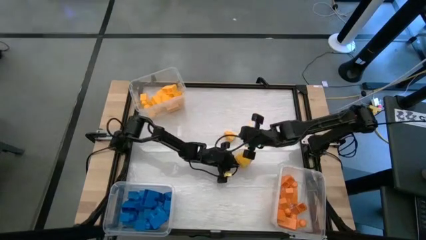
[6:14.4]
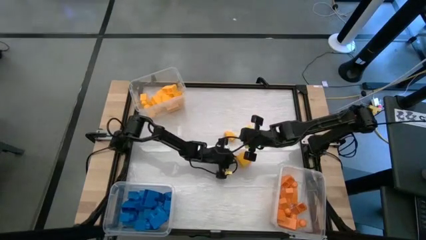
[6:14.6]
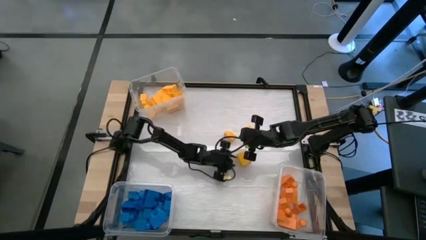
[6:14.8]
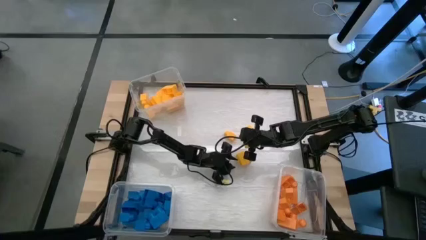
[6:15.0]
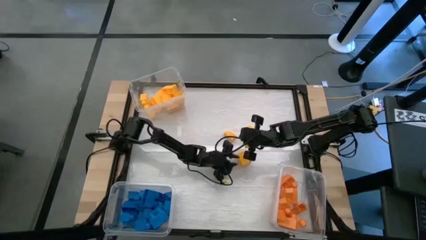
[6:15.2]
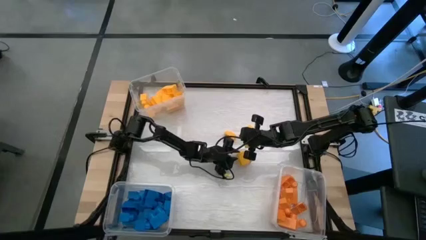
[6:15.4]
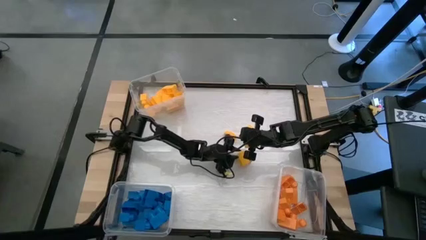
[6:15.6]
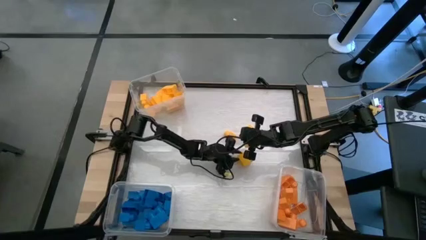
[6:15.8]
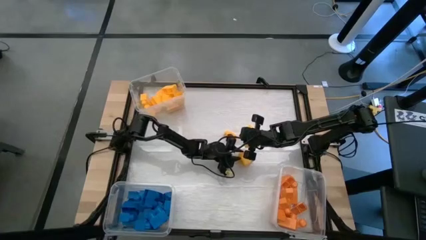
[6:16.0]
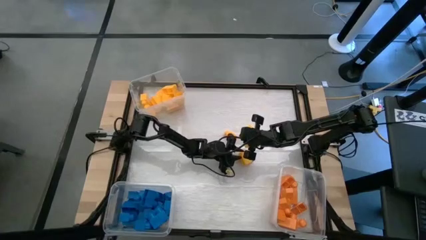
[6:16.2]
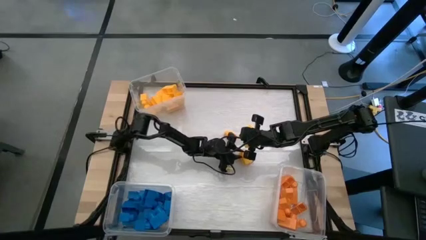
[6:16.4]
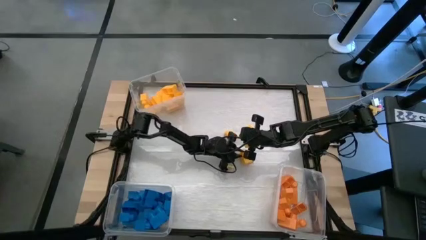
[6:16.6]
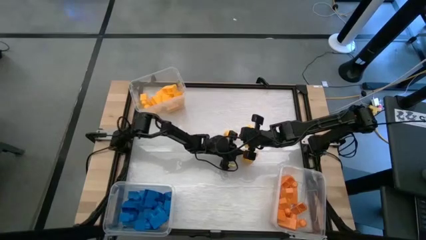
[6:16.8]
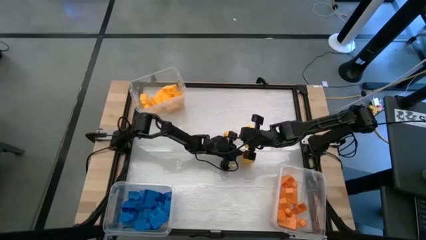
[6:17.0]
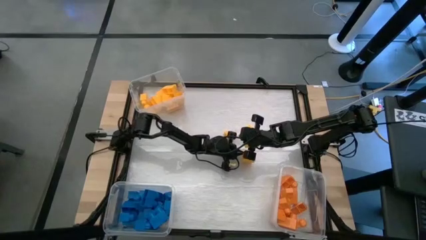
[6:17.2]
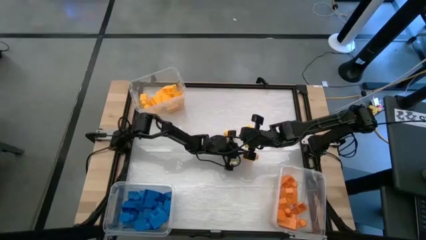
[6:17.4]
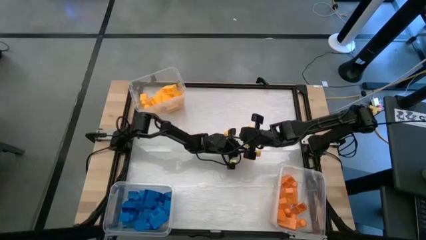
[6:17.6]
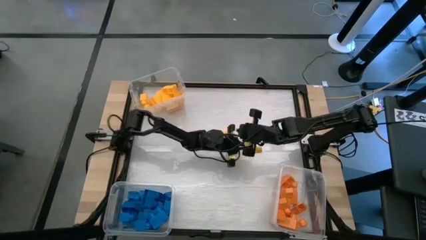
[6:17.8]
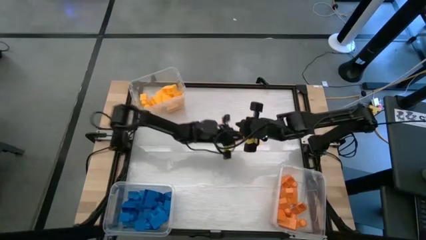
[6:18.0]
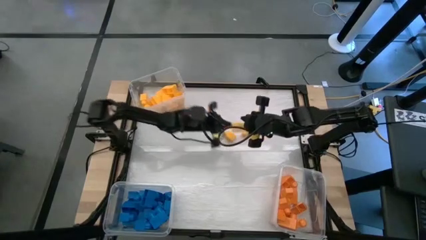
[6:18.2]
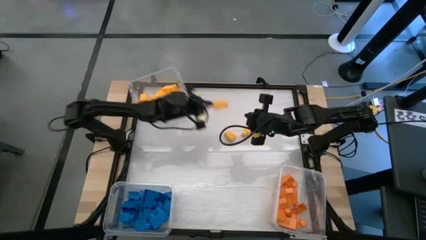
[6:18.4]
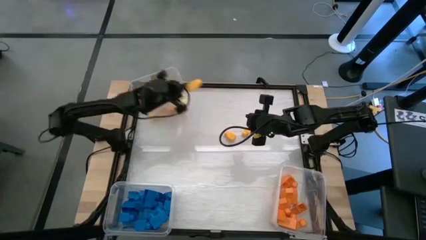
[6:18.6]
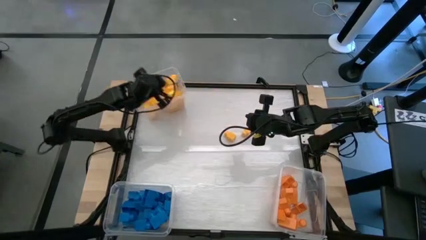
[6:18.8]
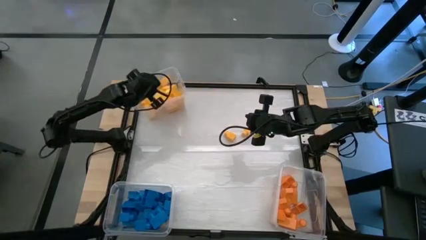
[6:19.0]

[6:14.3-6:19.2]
Task: Sort blocks
Put the yellow game piece into the top transparent bin

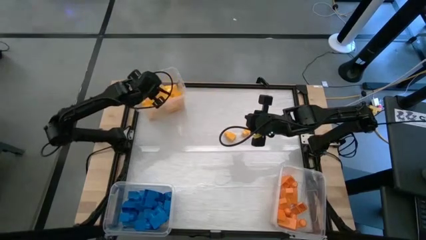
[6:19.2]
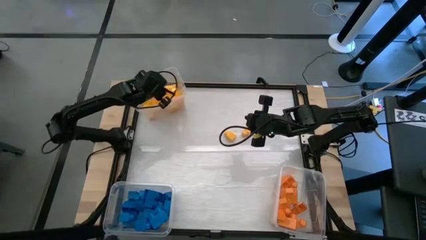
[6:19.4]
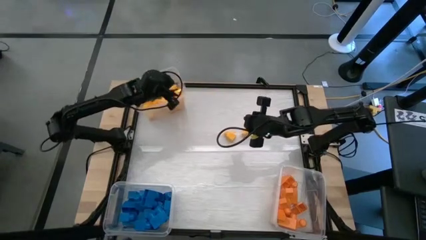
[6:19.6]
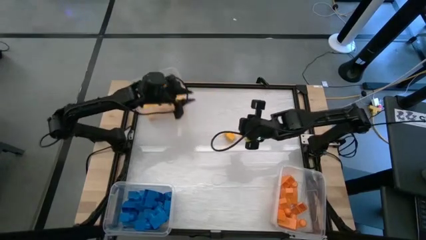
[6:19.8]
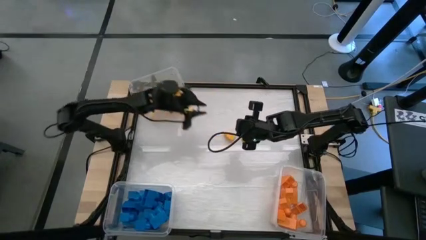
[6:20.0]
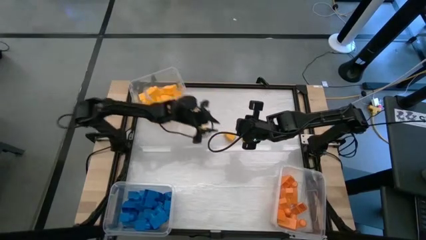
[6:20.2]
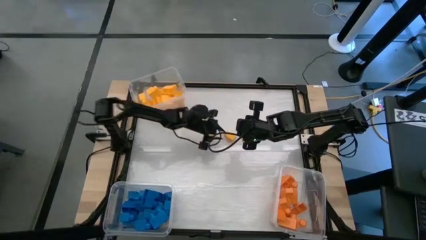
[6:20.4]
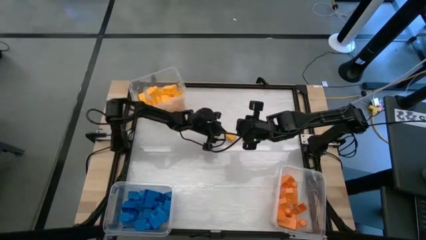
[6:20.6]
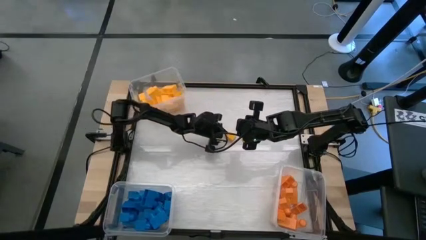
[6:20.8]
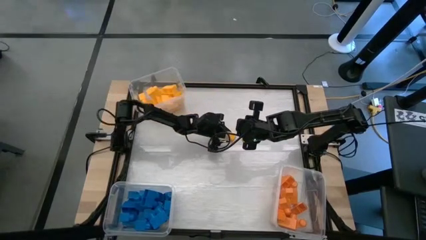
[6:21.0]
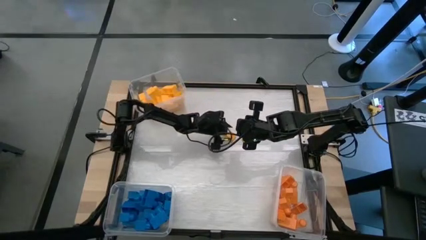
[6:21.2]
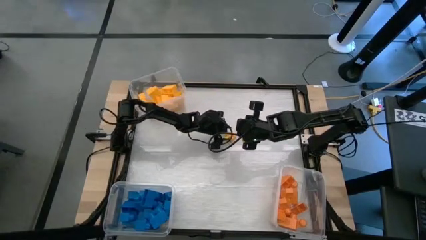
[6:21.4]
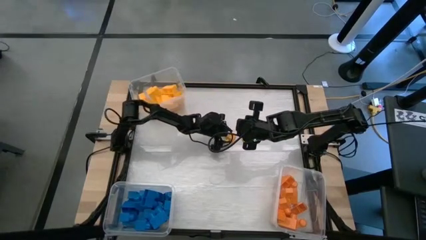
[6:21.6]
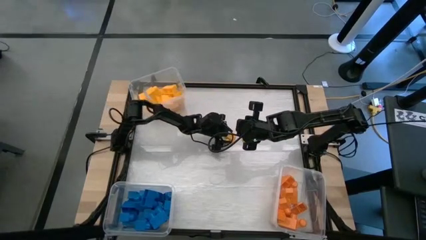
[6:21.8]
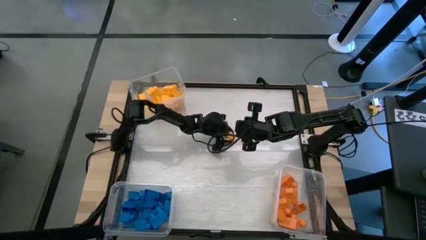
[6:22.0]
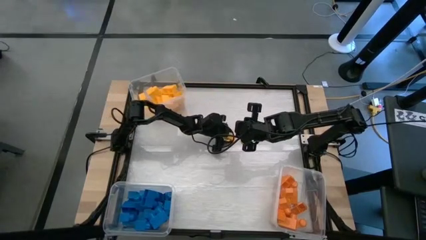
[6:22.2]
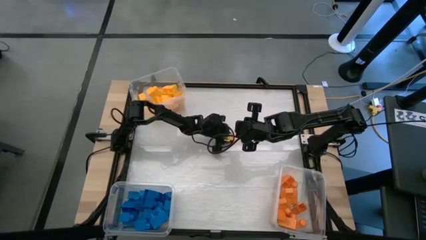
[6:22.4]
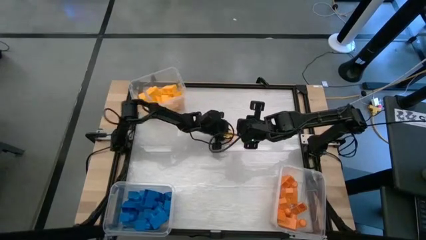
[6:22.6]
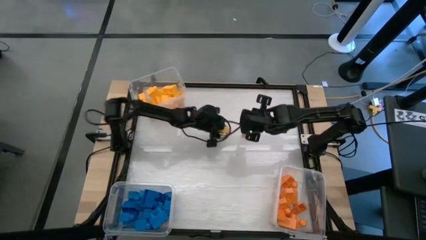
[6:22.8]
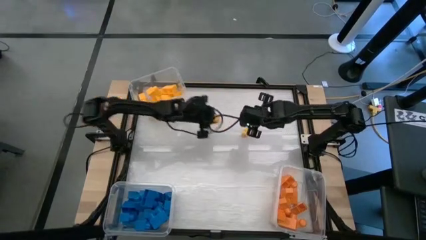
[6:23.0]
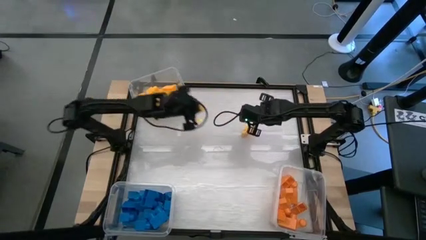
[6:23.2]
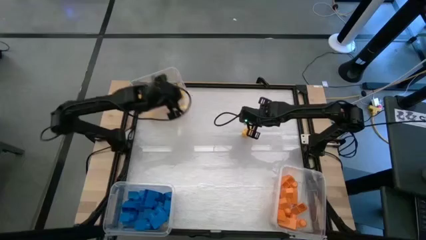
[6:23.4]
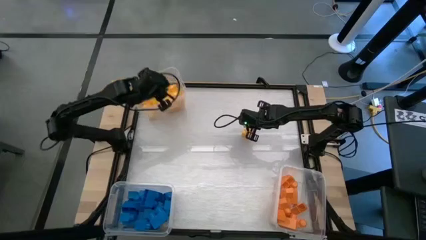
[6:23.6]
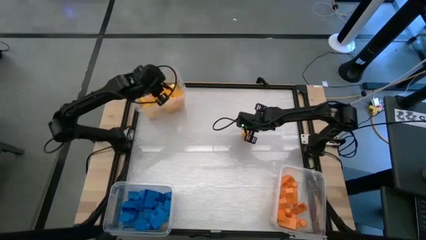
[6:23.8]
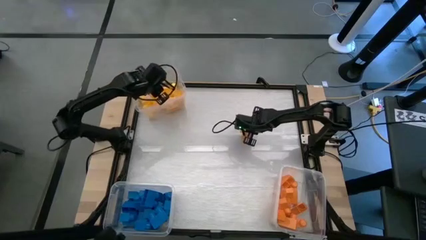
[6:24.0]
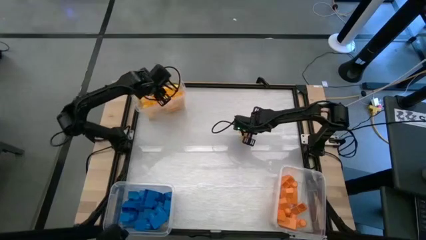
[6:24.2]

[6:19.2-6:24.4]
Put the yellow game piece into the top transparent bin

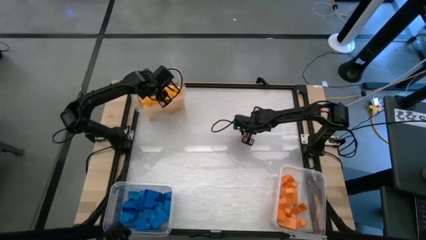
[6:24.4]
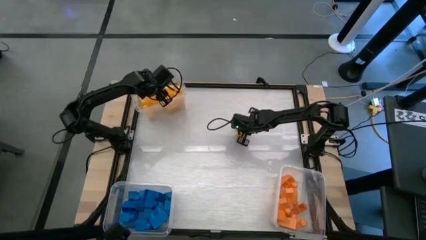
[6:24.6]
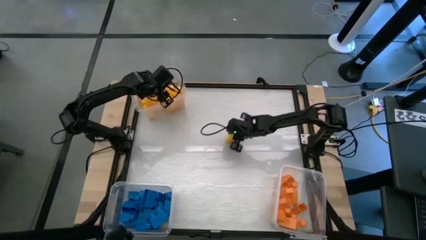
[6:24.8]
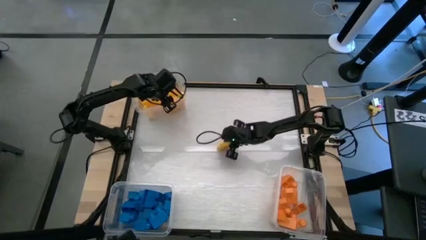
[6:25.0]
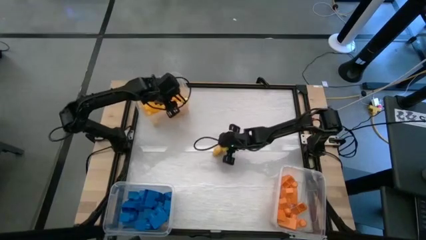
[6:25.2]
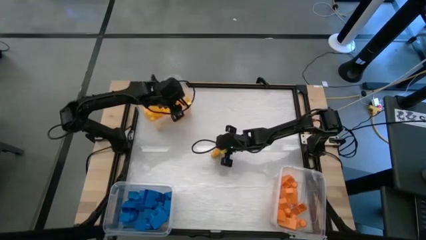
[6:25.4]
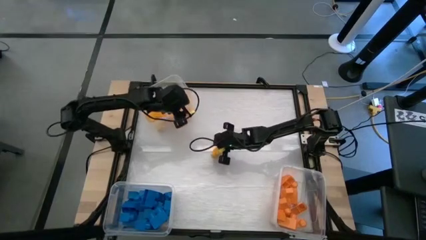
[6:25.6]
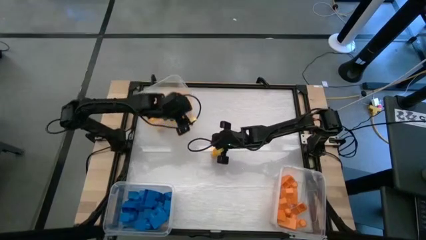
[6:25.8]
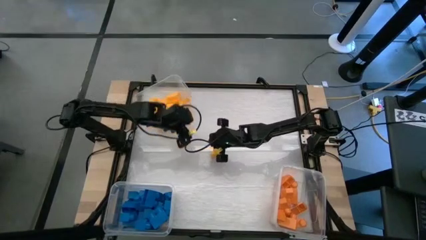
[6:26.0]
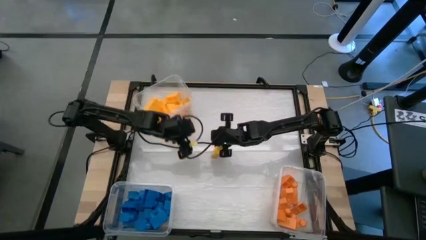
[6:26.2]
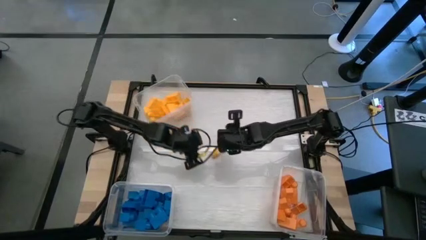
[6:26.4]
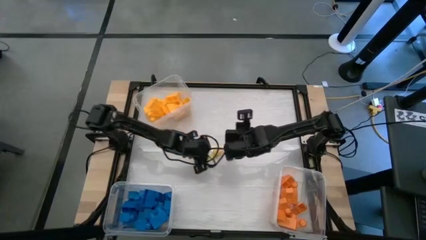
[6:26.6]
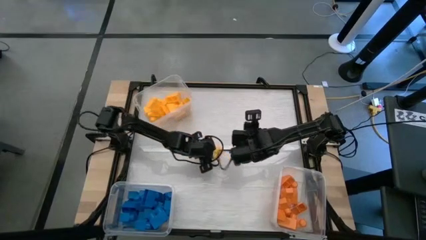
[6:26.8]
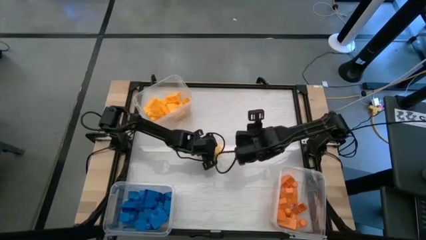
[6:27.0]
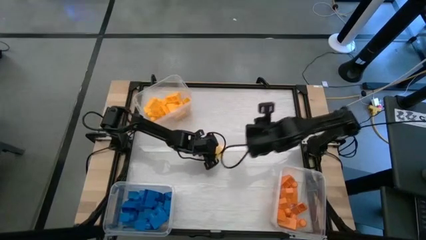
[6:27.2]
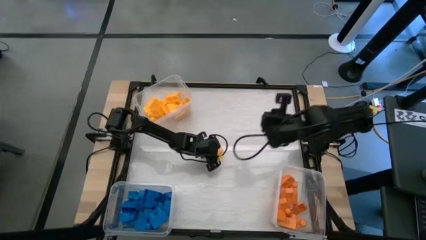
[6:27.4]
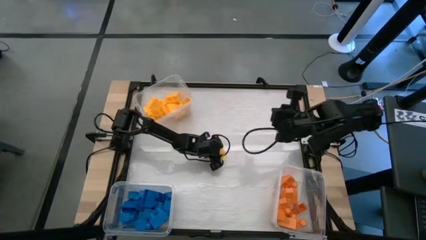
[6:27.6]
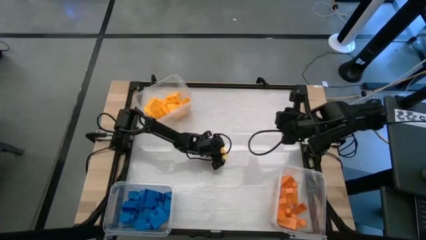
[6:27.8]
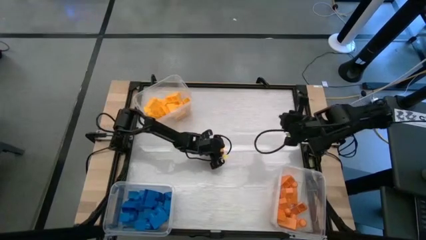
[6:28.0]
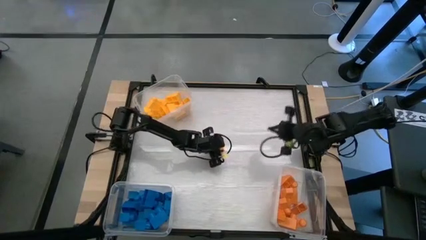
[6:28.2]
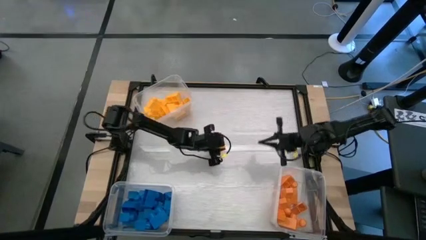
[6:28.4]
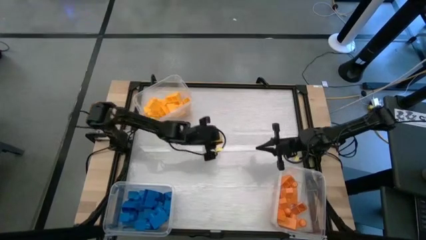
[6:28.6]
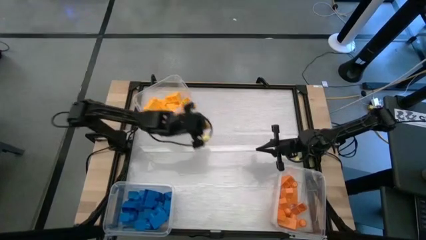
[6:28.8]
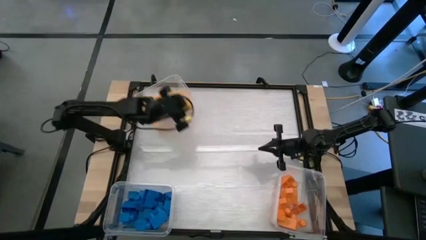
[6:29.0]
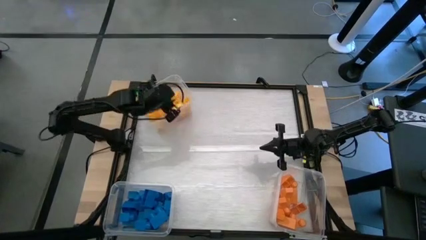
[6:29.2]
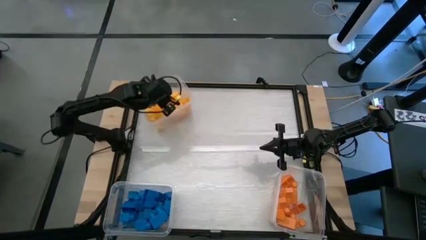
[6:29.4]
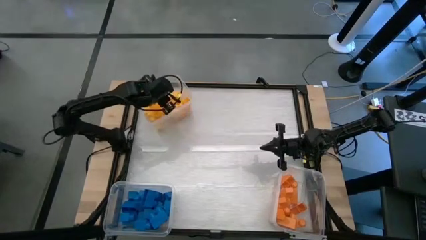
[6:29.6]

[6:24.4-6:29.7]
Put the yellow game piece into the top transparent bin

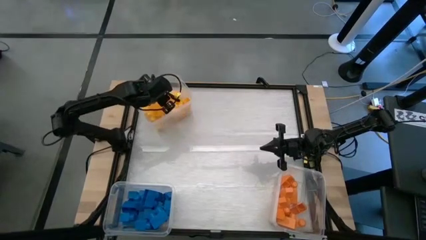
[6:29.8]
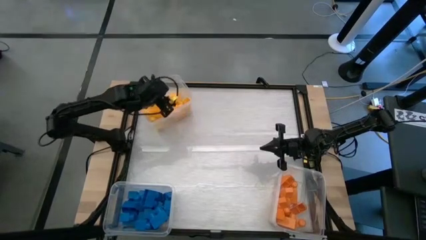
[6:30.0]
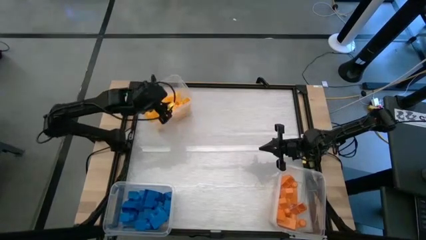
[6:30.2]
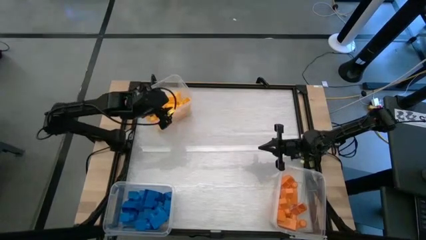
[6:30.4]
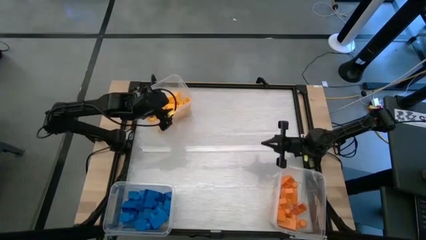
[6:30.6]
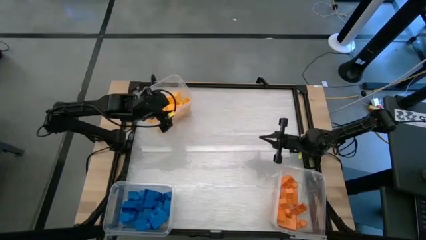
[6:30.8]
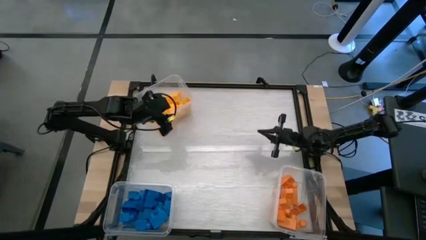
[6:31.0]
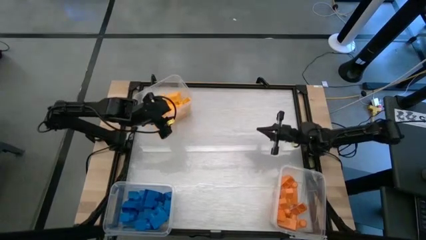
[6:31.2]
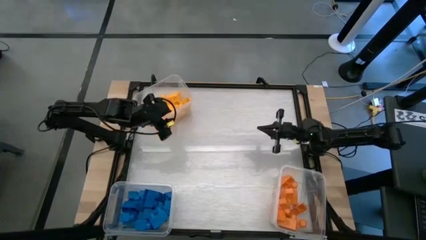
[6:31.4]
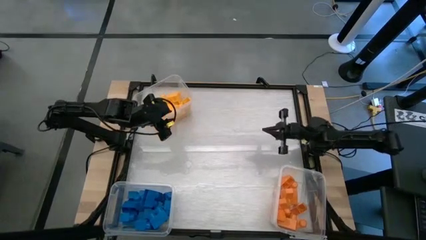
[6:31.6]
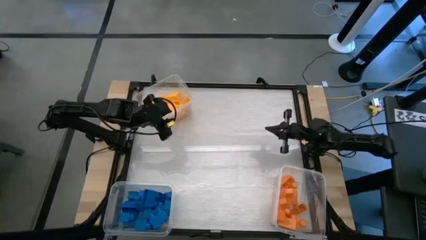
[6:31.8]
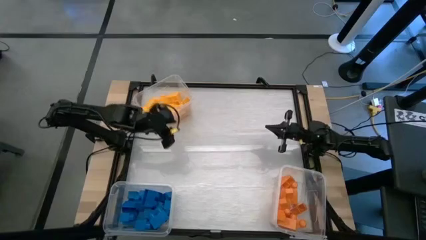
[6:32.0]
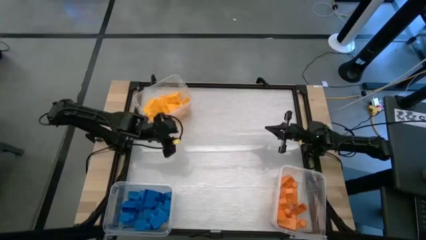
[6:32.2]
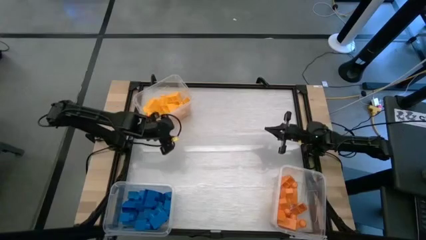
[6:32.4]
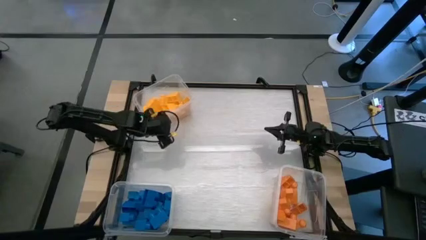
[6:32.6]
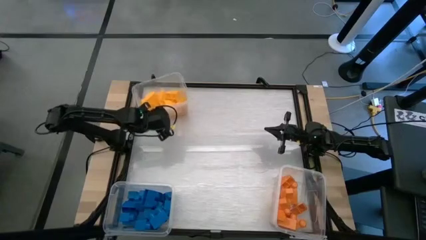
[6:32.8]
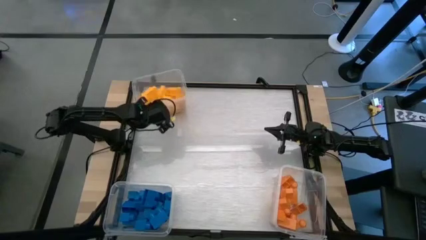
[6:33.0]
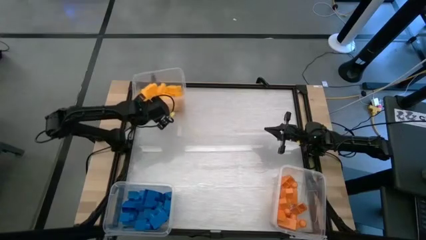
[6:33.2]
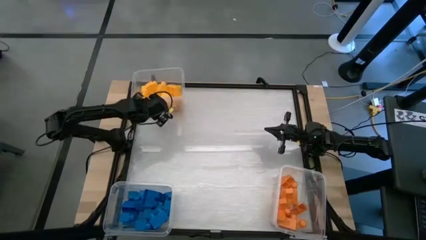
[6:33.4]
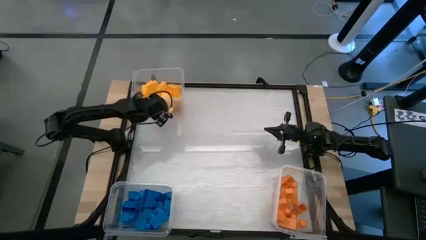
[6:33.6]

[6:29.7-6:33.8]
Adjust the top transparent bin to the top left part of the table
